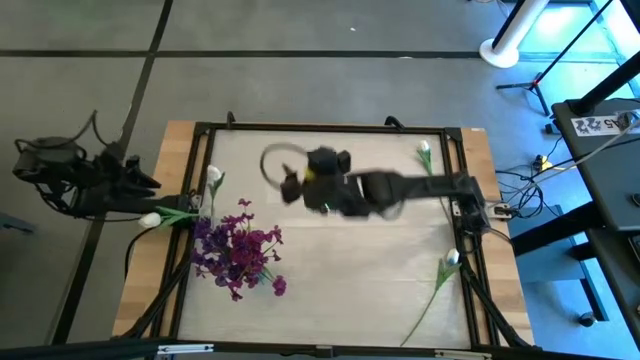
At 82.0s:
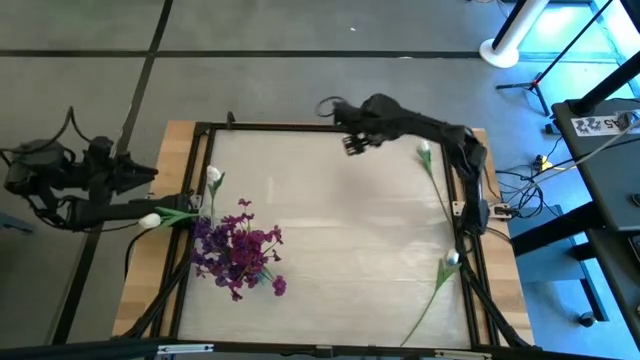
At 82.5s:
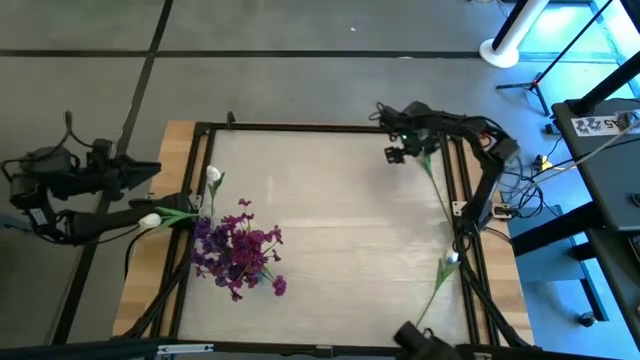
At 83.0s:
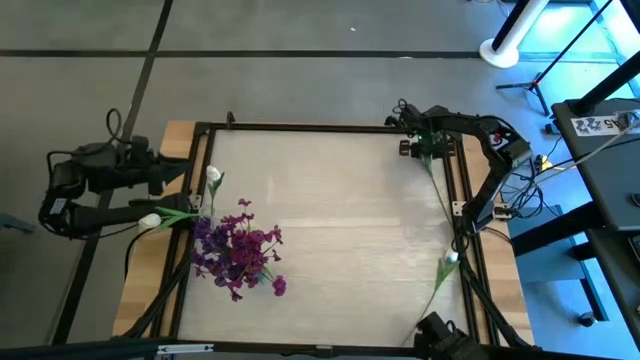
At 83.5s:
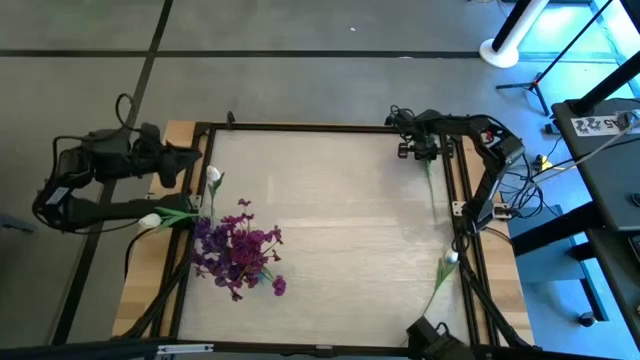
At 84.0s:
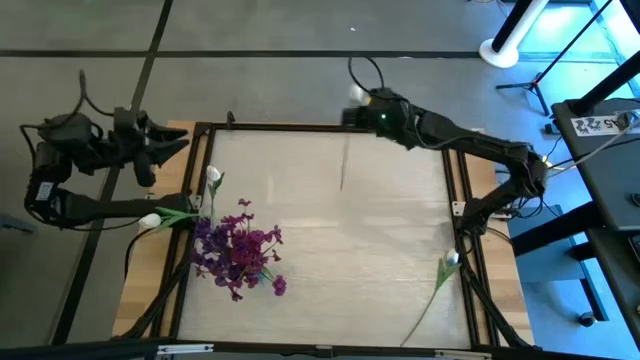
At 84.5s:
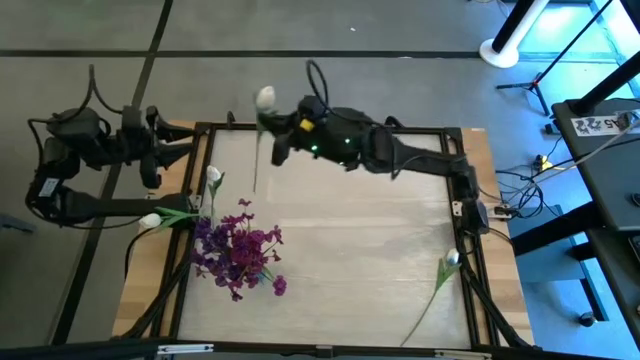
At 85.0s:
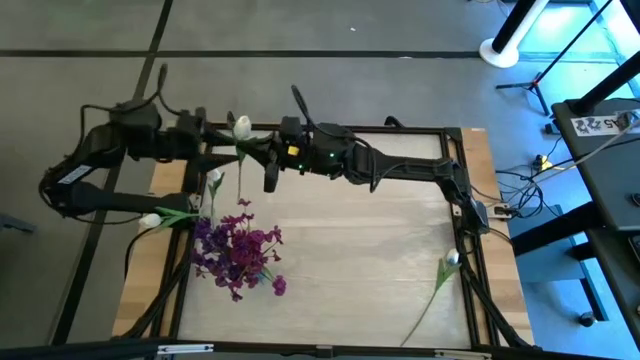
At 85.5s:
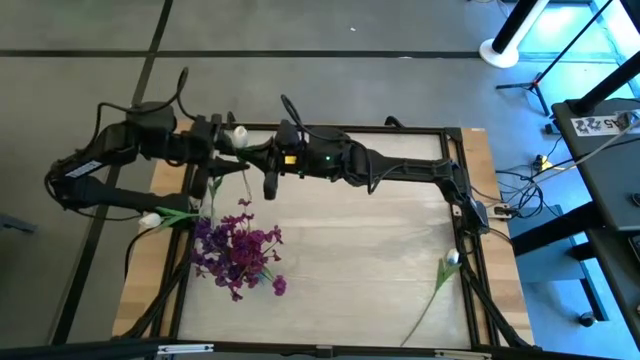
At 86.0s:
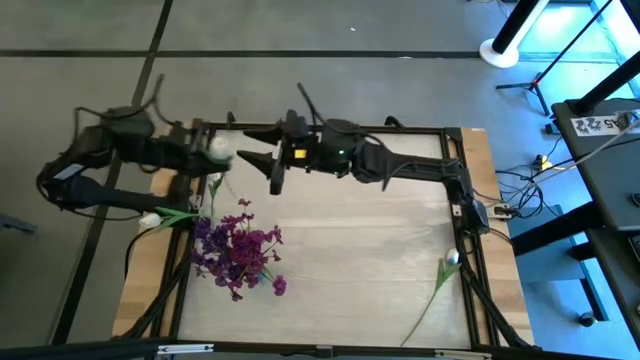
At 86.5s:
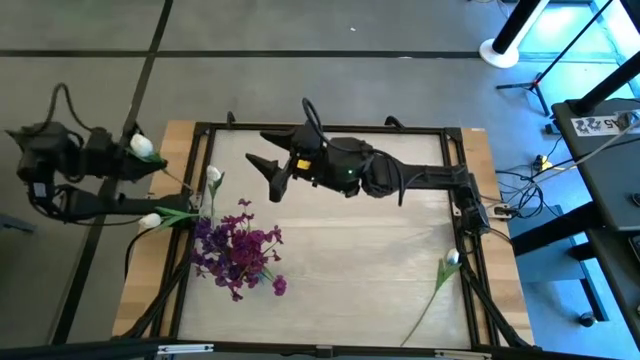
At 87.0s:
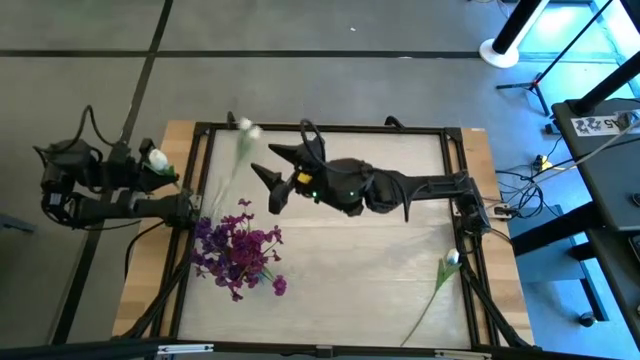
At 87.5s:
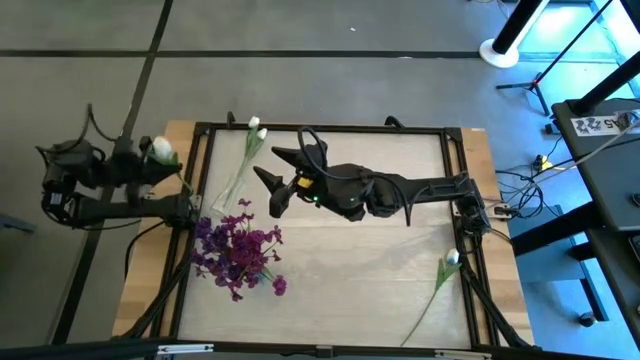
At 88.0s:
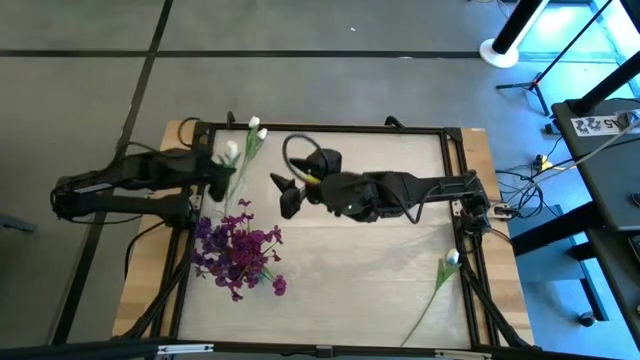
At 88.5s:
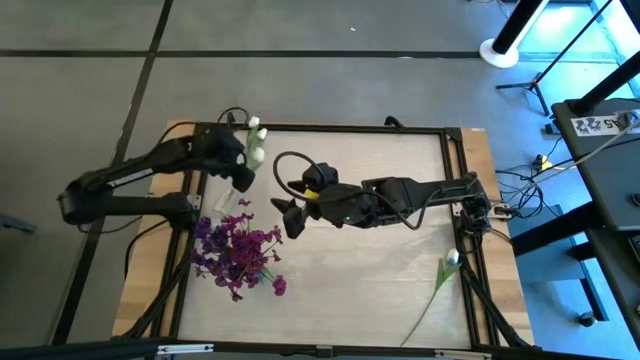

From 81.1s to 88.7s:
Task: Sort flowers into vase by color
Put the top white flower into the transparent vase

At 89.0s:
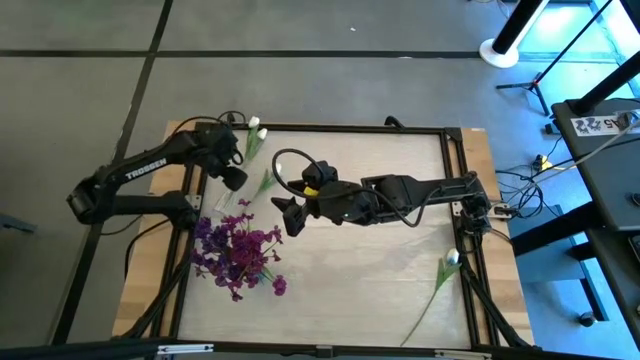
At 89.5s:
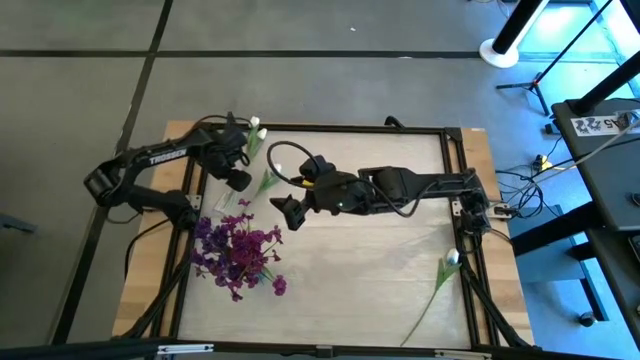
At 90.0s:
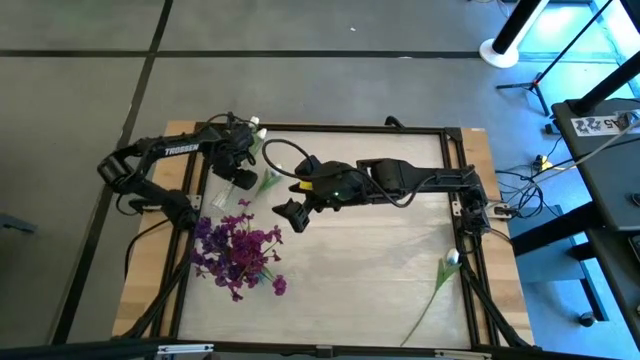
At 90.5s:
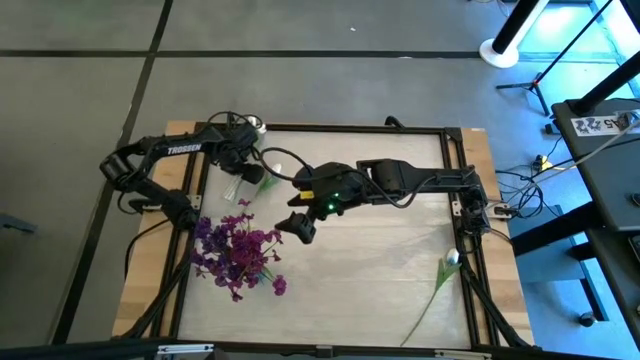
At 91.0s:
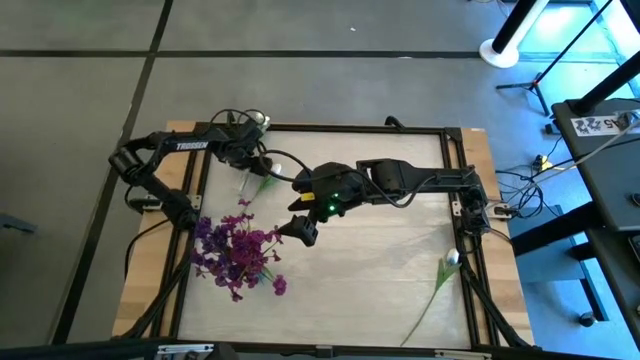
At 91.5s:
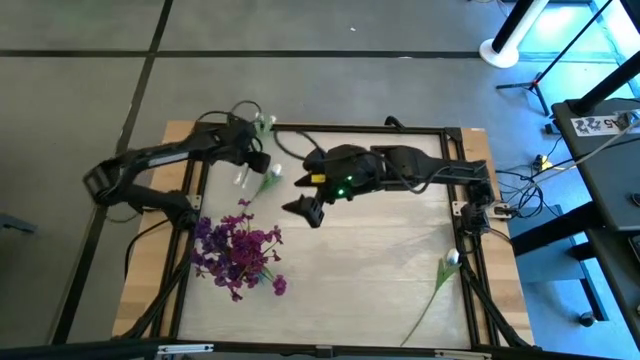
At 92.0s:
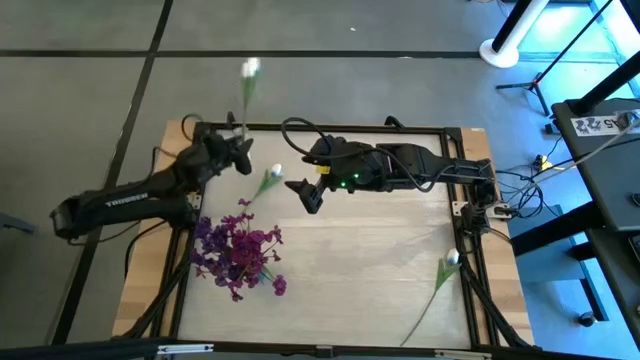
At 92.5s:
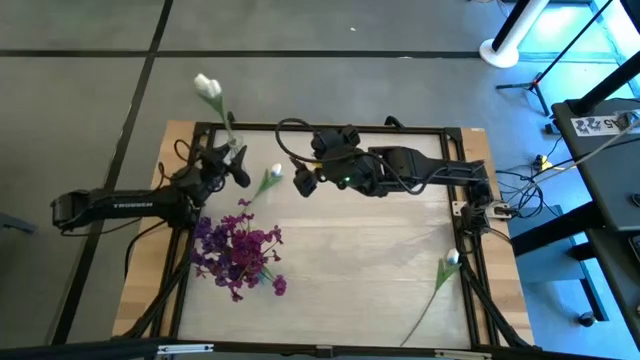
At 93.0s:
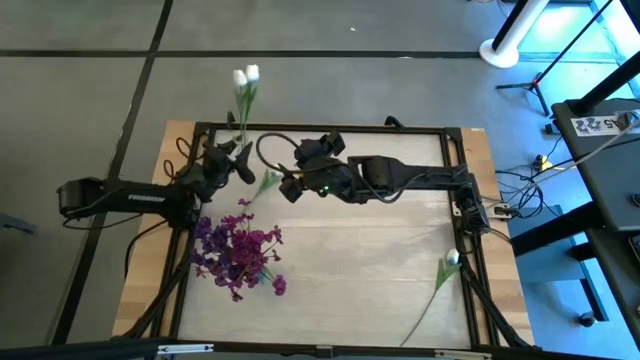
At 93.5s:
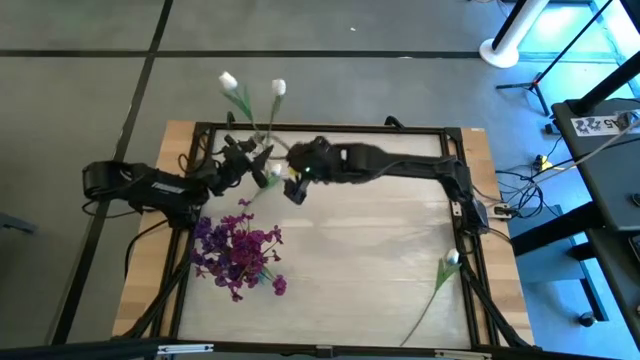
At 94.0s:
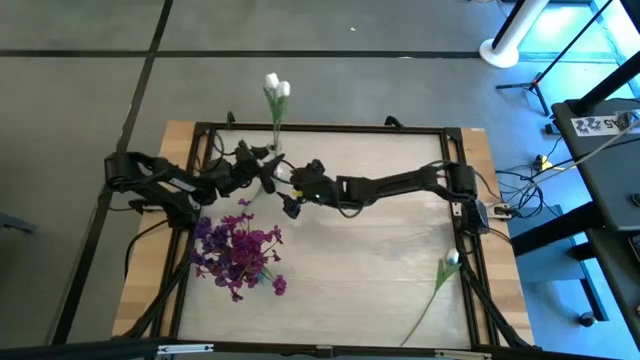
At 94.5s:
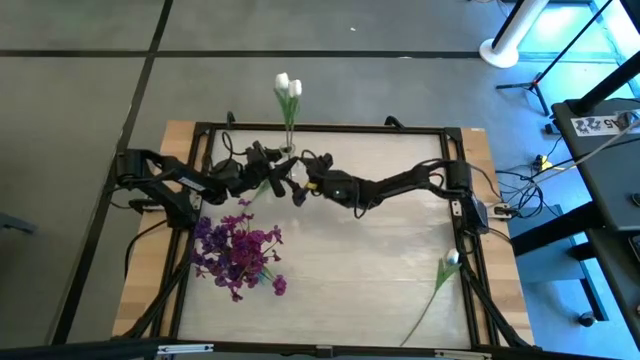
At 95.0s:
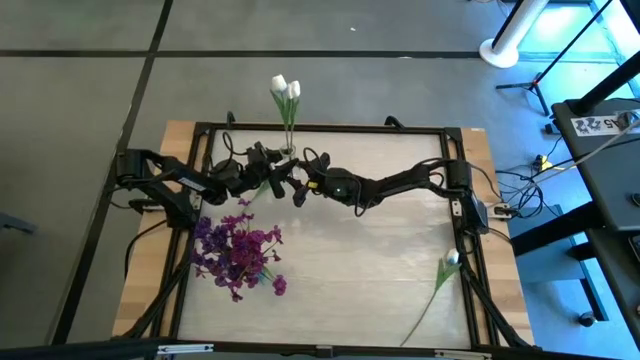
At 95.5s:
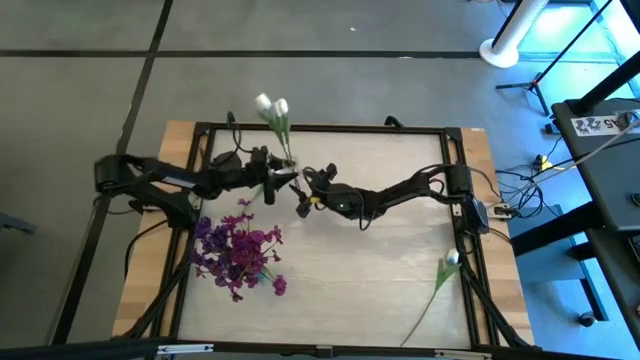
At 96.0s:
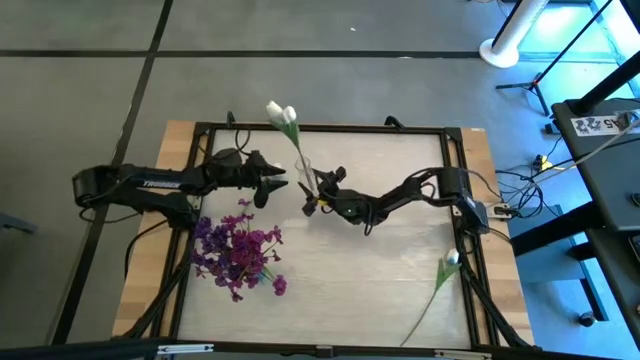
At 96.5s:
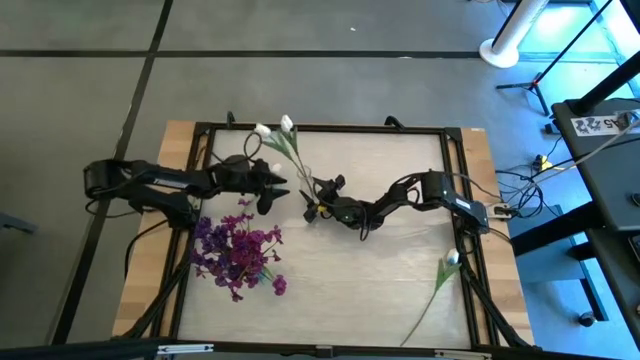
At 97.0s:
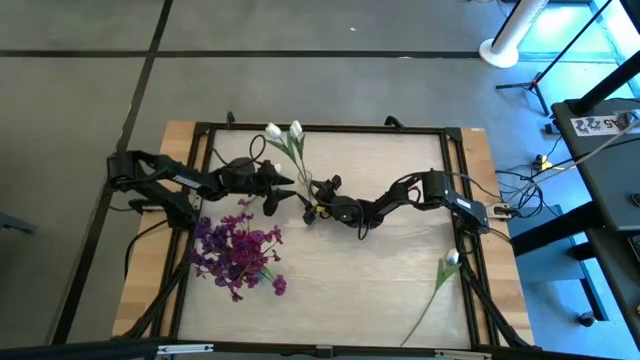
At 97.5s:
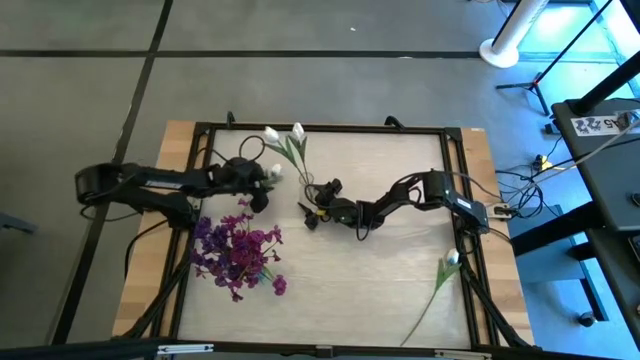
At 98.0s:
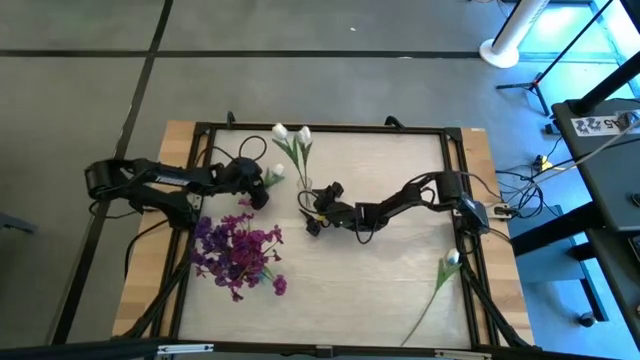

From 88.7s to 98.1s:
Put the transparent vase containing the white flowers on the top center of the table upright

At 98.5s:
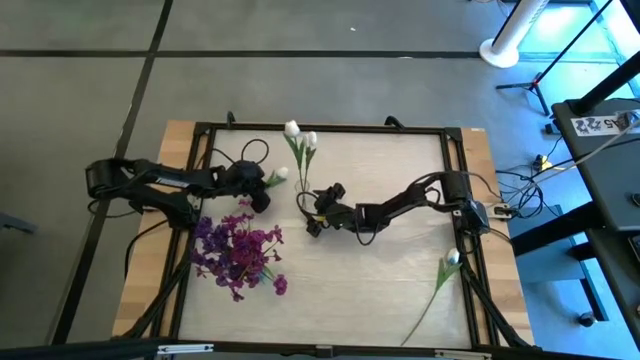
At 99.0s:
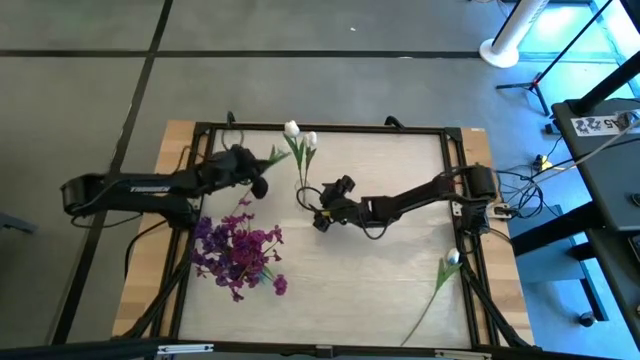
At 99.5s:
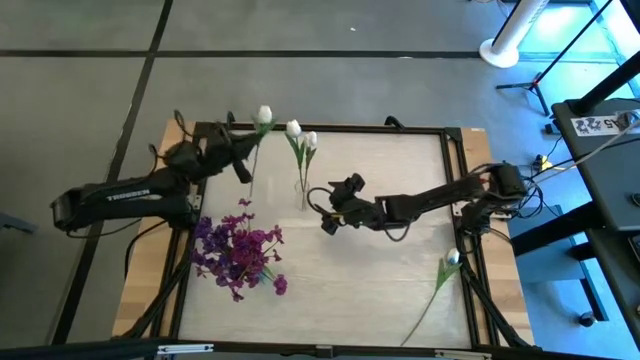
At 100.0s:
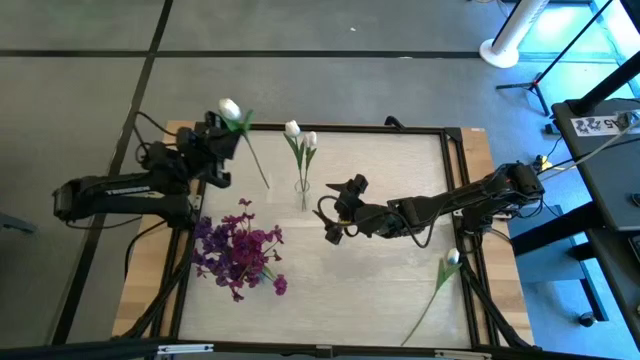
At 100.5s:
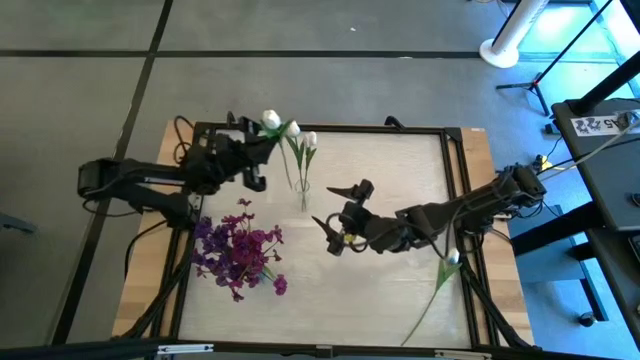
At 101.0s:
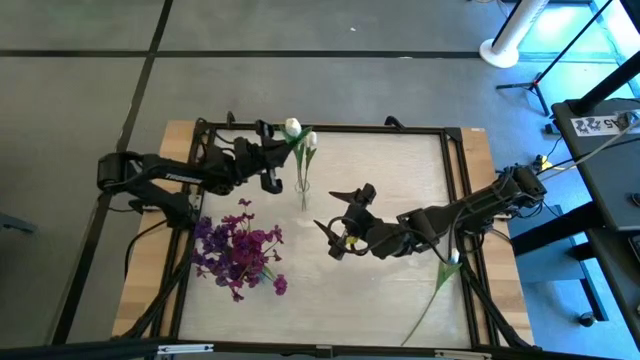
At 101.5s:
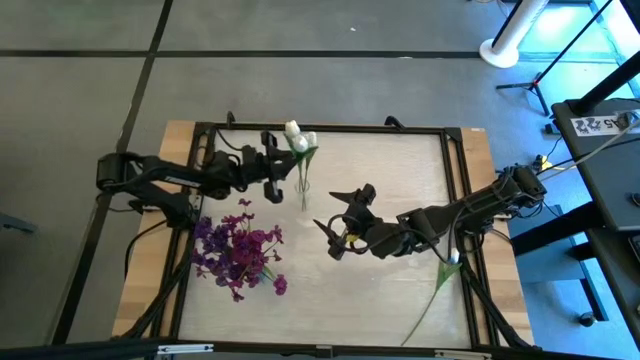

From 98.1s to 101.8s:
Put the white flower into the transparent vase

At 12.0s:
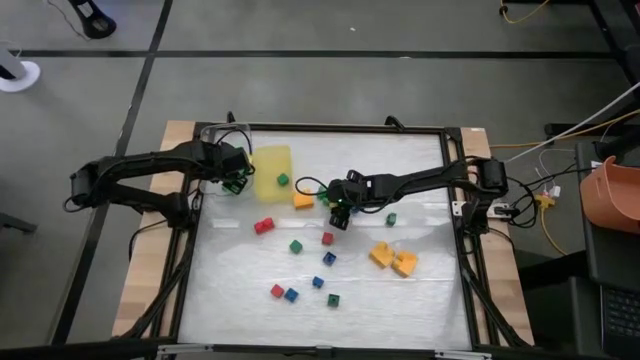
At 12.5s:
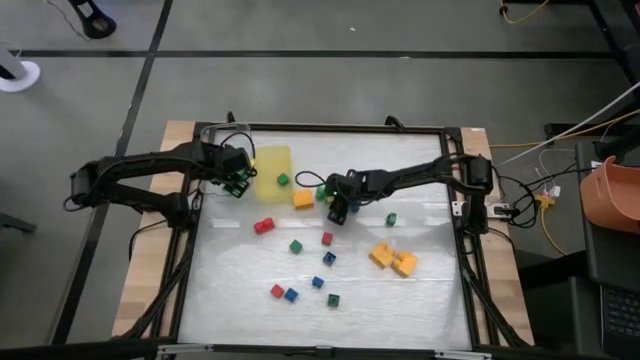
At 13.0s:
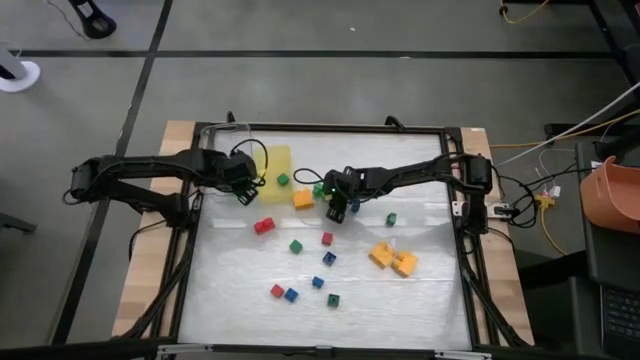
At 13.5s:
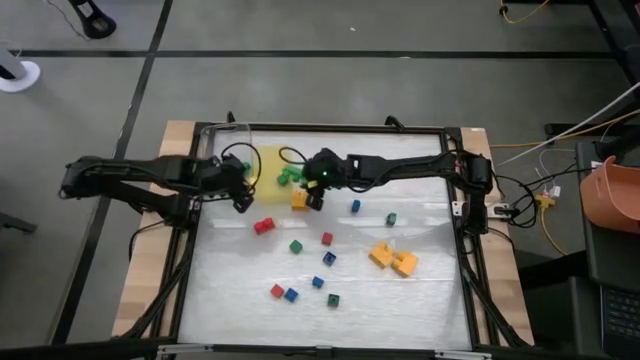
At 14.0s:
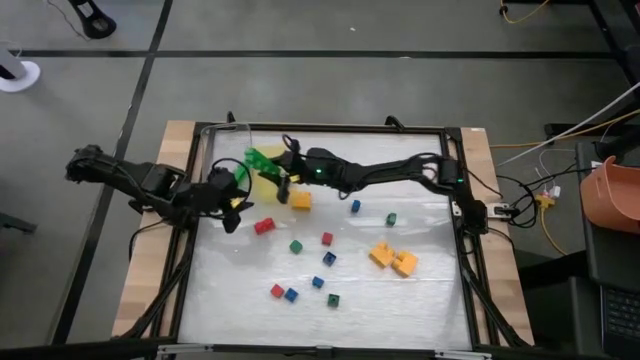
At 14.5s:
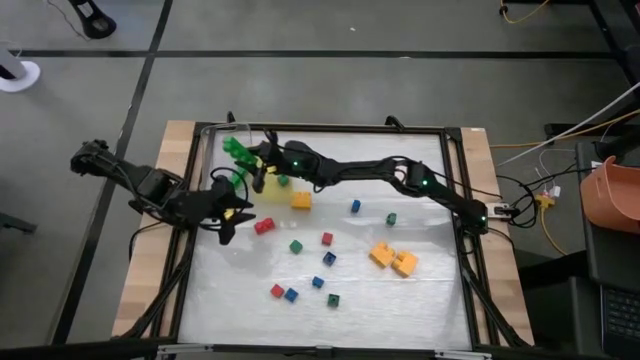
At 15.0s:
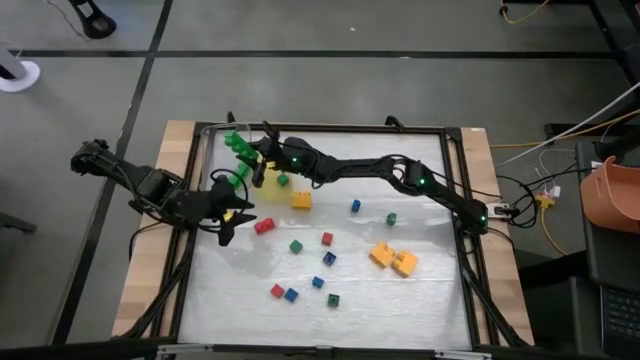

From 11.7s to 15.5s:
Task: Sort blocks by size
Put the large green game piece into the transparent bin
